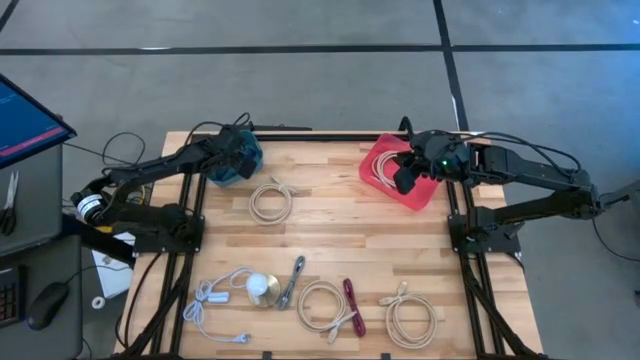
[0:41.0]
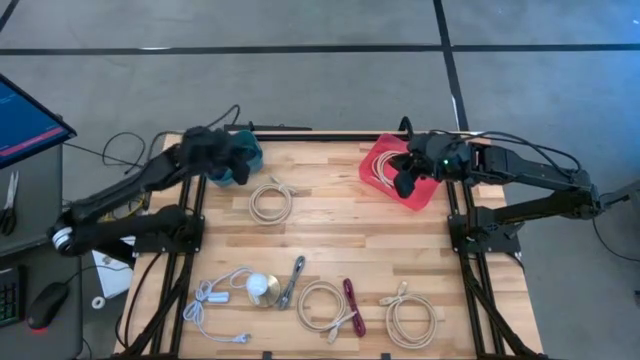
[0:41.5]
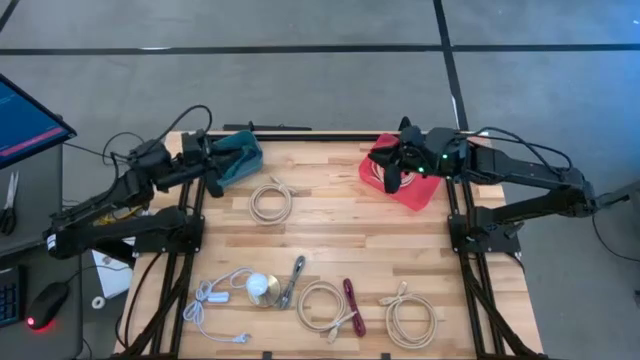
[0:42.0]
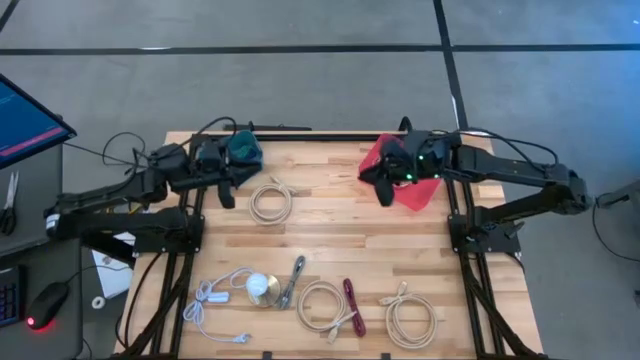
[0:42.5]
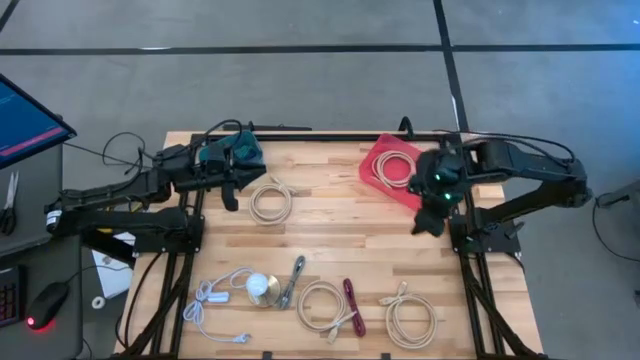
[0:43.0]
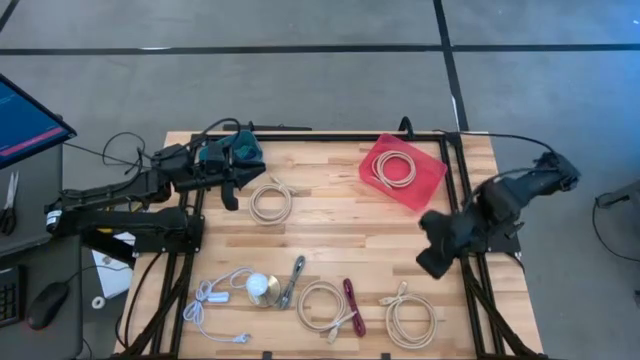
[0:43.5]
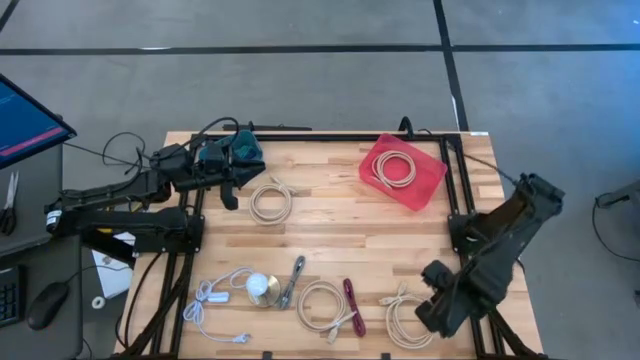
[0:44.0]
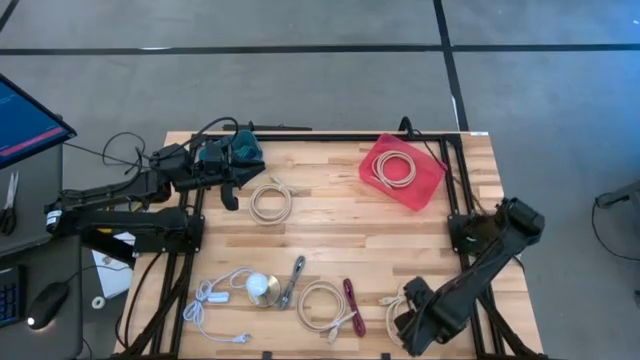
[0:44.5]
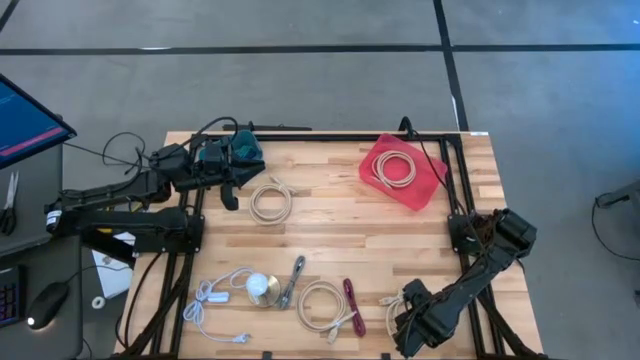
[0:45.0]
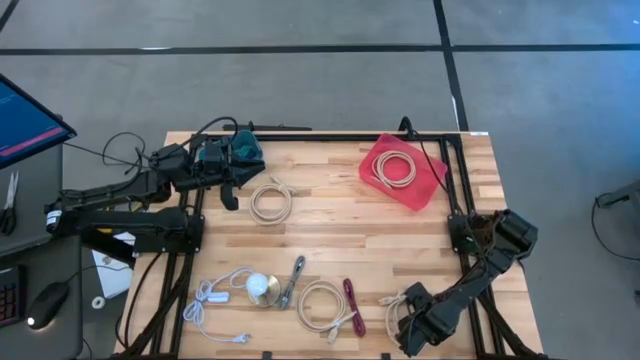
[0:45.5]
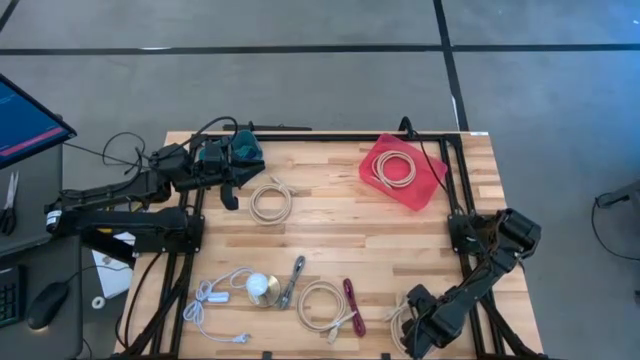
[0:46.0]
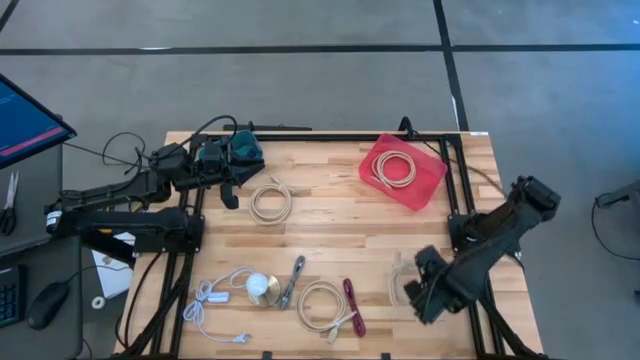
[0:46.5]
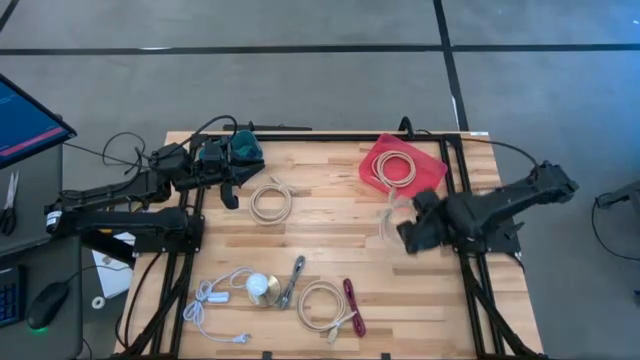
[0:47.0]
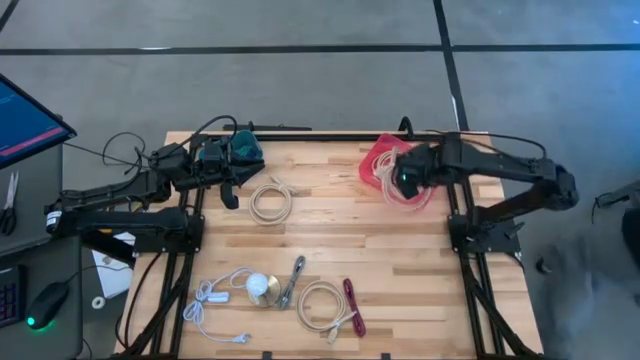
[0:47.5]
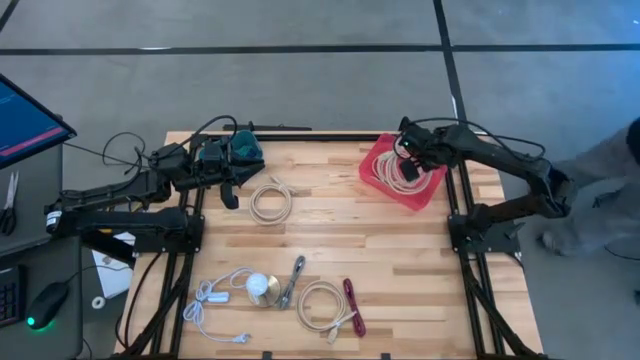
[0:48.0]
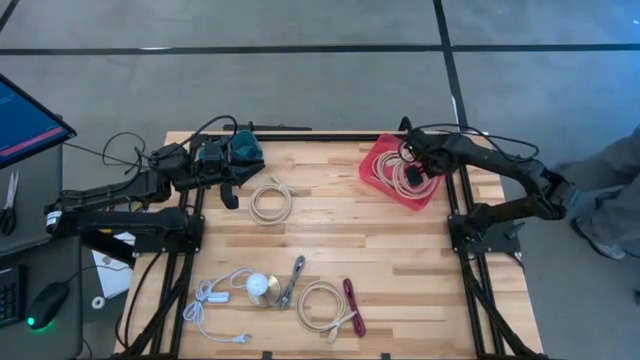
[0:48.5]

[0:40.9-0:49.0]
Task: Pick & Place USB Port
Put the white charger cable into pink bin

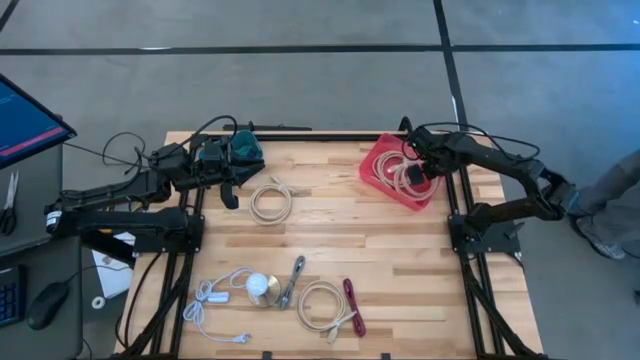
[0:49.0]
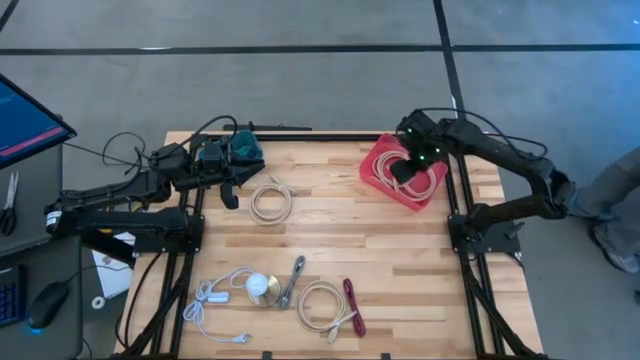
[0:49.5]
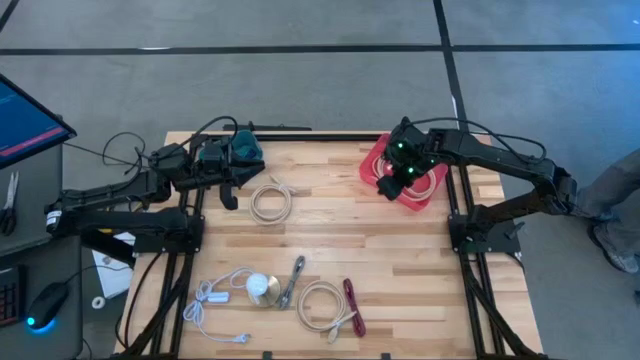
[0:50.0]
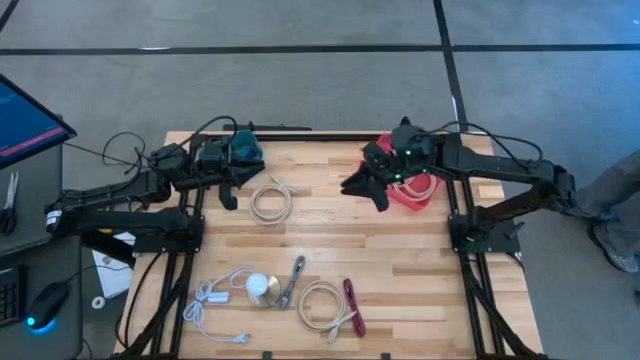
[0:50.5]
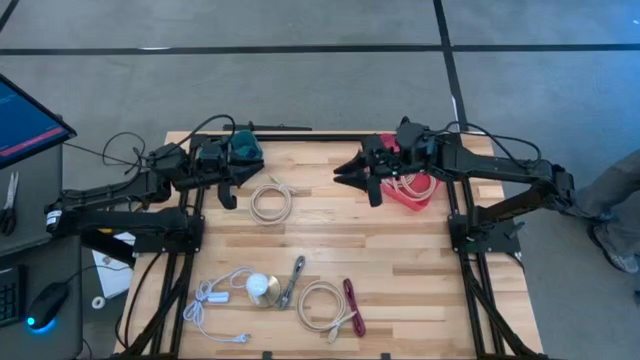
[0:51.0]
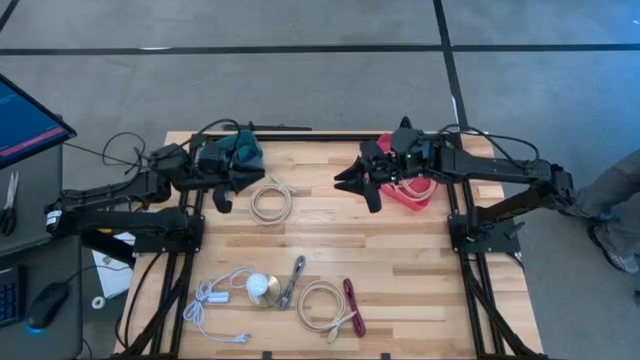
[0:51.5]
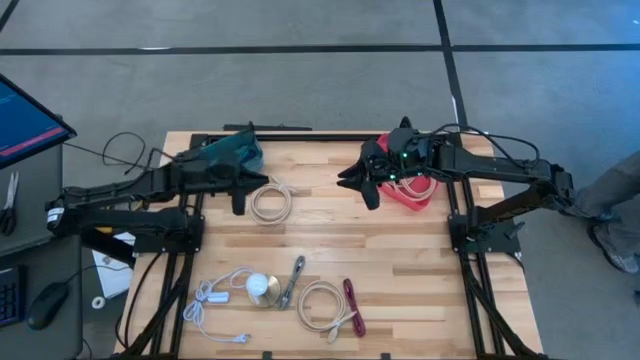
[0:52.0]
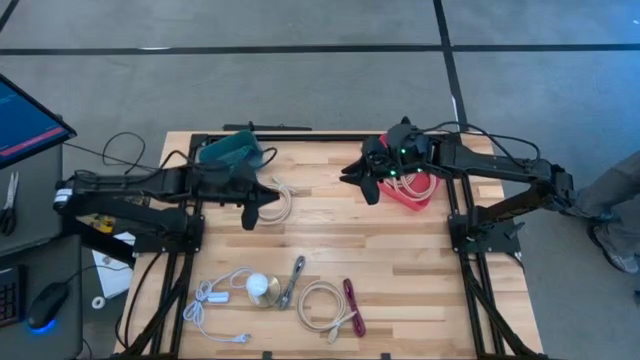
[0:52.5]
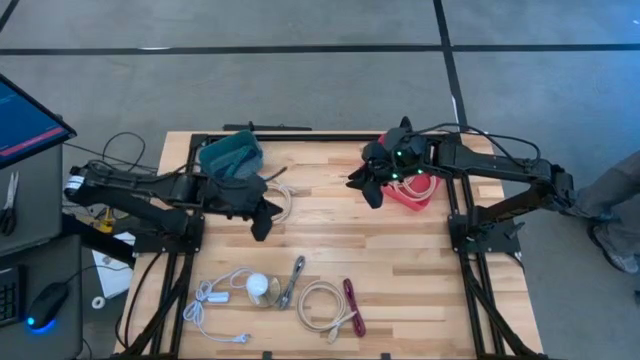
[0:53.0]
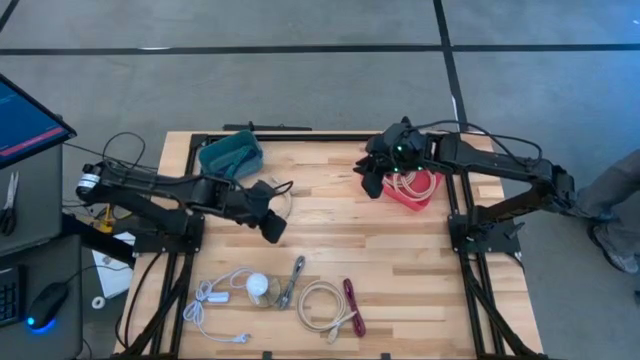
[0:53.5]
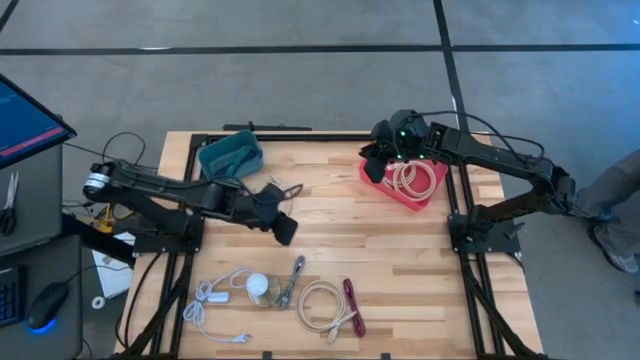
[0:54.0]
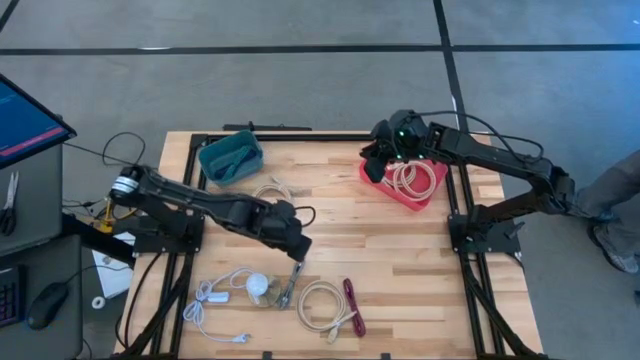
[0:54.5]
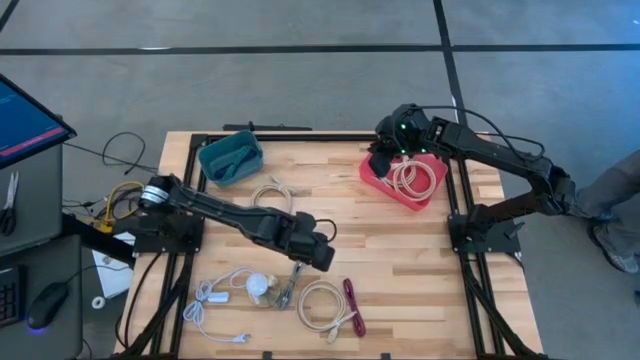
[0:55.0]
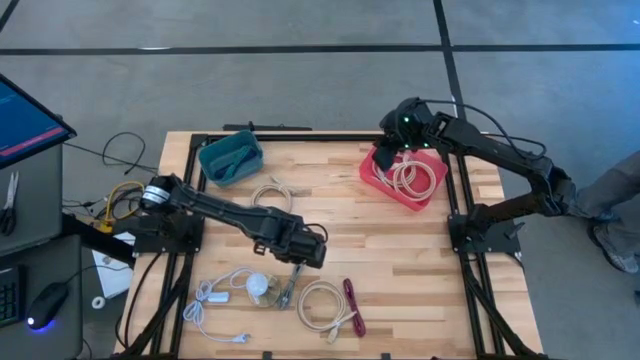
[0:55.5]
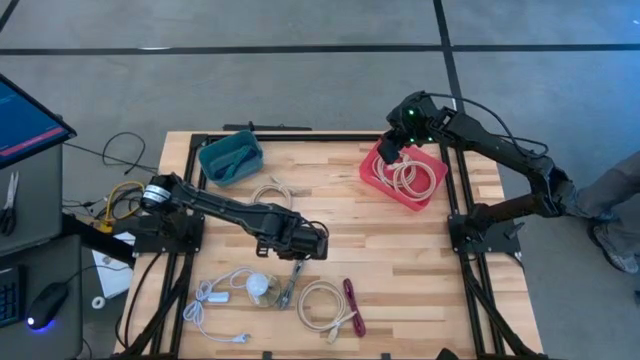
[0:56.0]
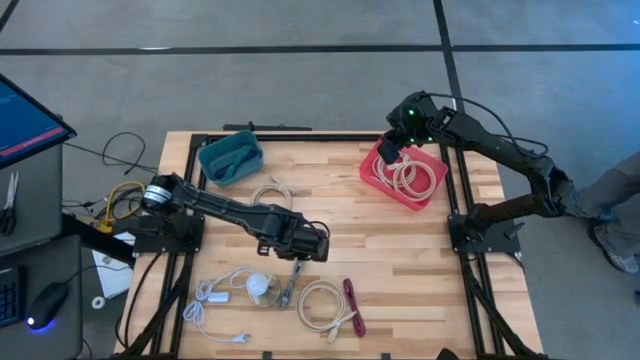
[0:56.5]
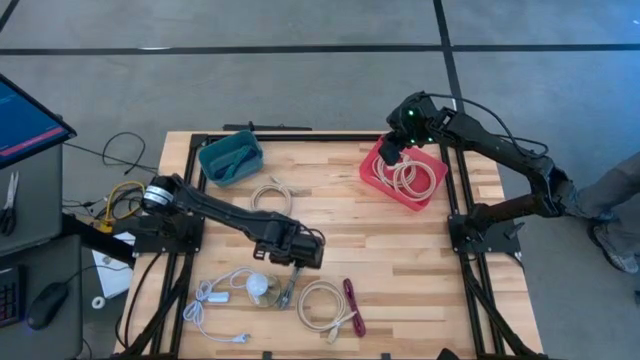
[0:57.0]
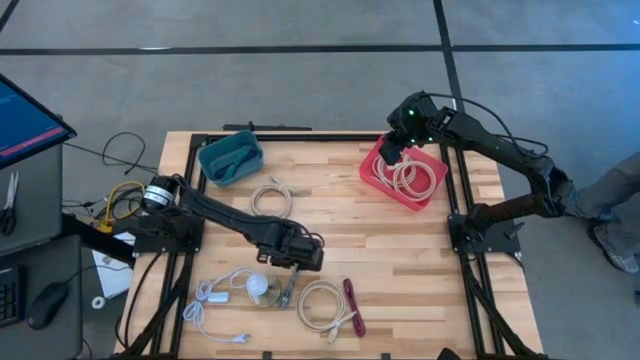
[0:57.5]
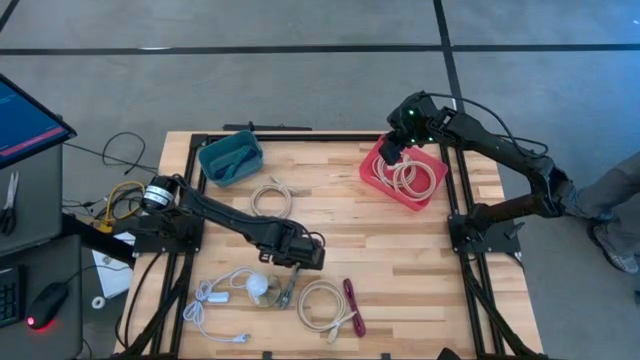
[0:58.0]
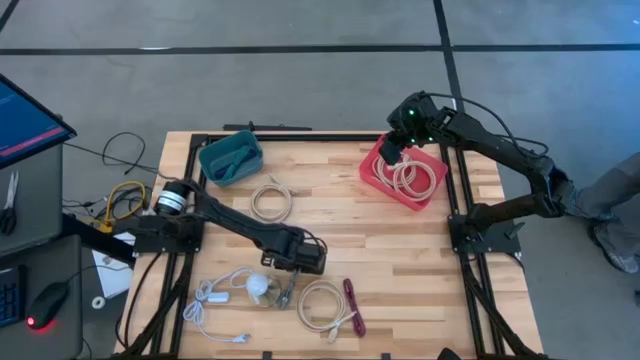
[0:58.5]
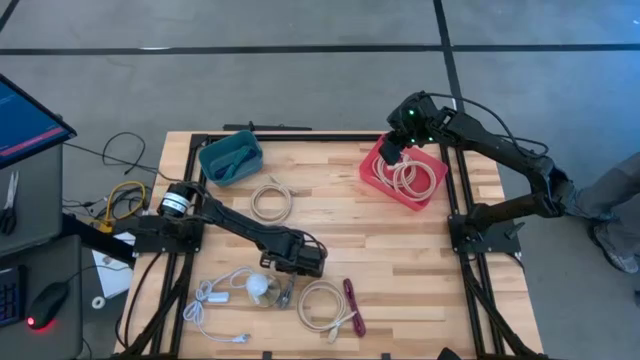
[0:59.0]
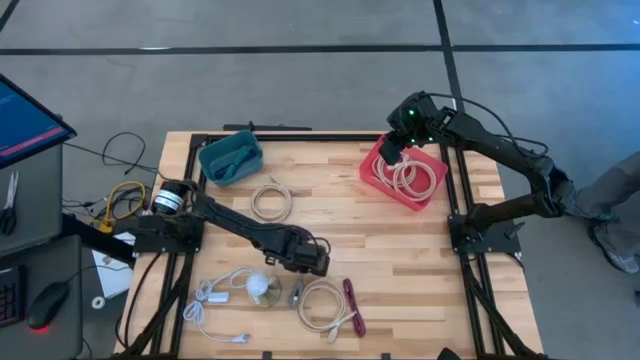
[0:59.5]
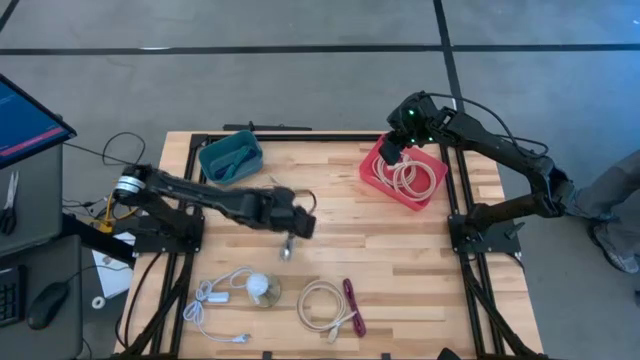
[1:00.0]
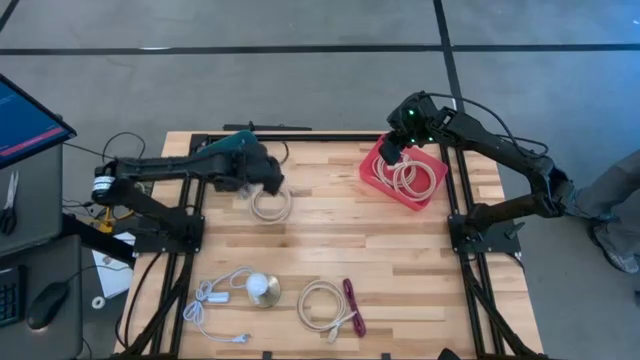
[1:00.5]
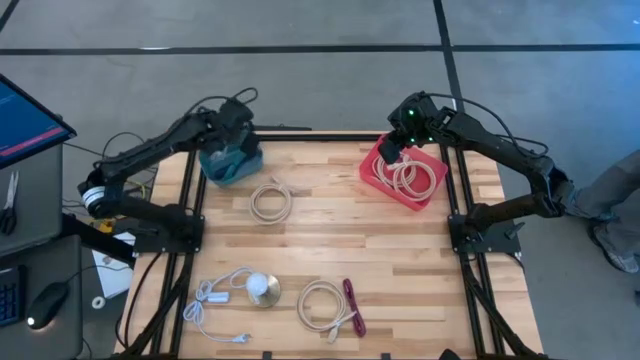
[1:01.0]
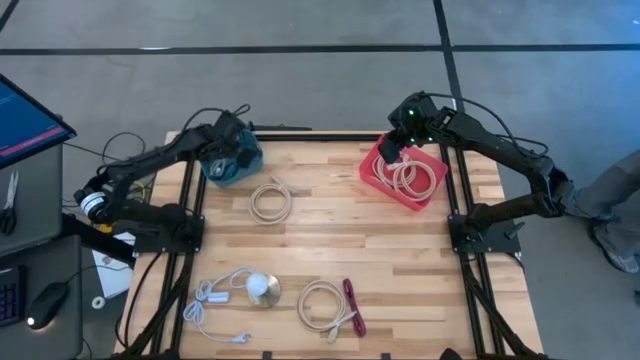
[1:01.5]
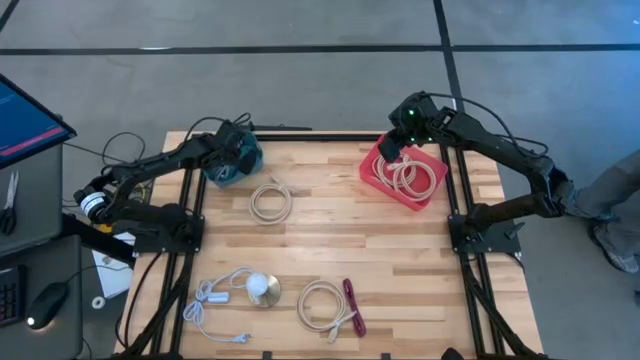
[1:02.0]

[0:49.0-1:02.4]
Put the white black charger cable into blue bin
